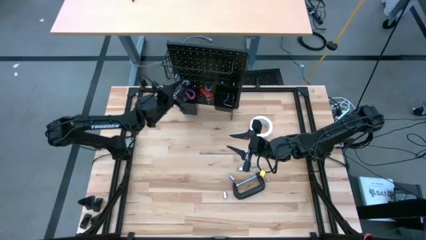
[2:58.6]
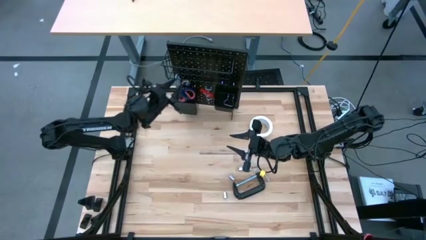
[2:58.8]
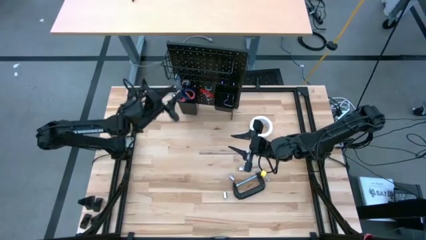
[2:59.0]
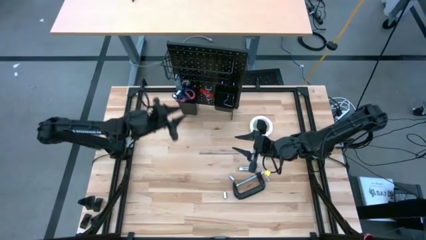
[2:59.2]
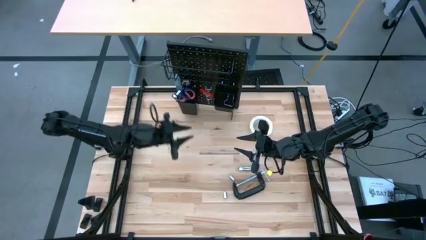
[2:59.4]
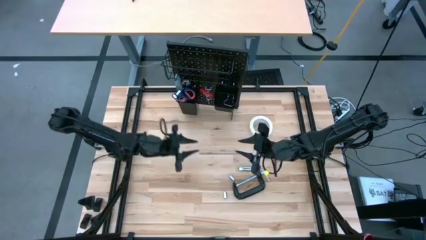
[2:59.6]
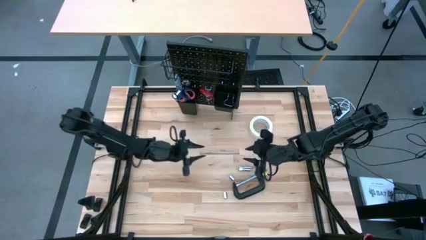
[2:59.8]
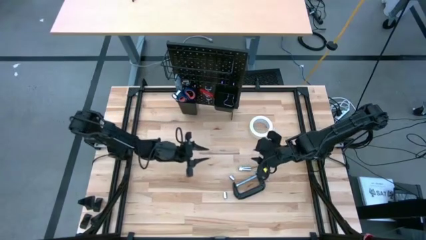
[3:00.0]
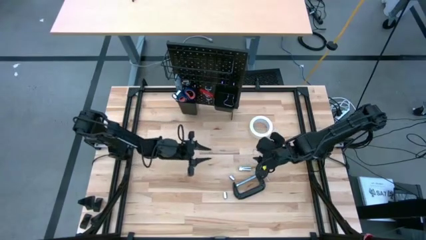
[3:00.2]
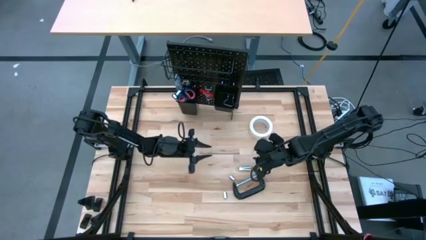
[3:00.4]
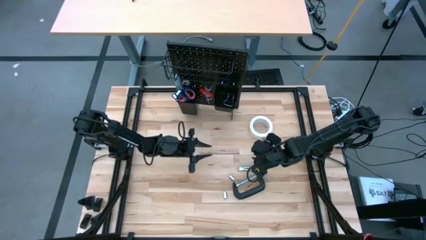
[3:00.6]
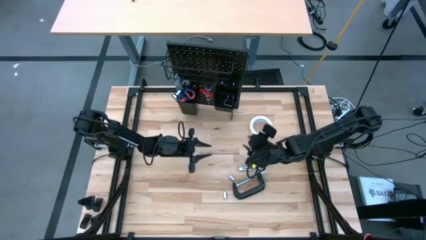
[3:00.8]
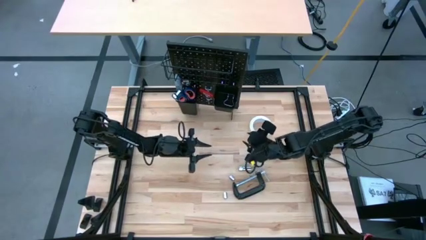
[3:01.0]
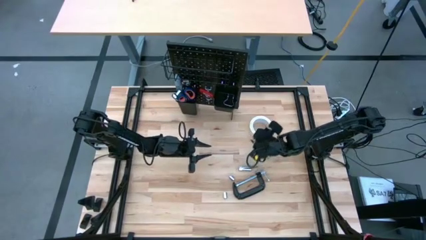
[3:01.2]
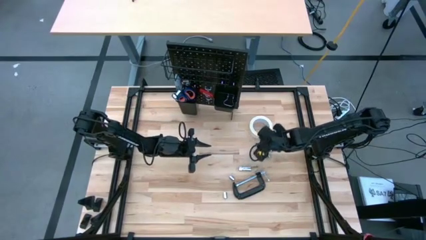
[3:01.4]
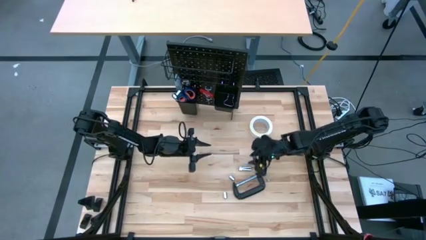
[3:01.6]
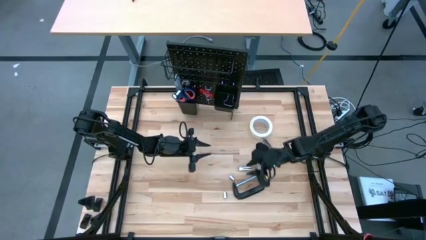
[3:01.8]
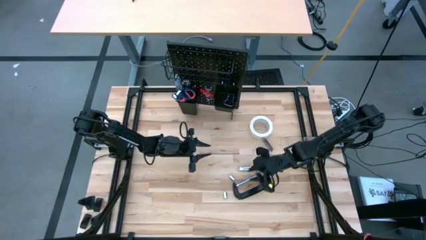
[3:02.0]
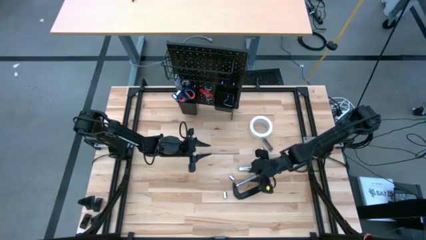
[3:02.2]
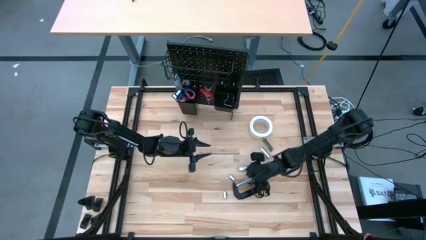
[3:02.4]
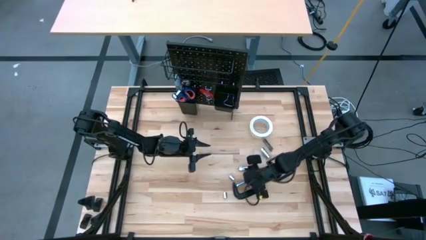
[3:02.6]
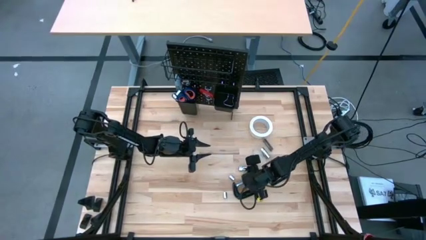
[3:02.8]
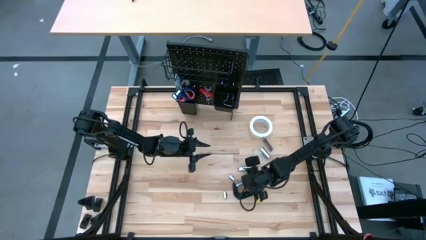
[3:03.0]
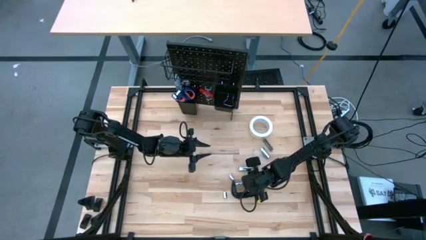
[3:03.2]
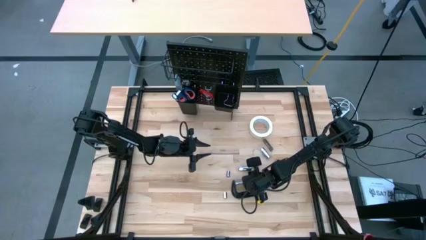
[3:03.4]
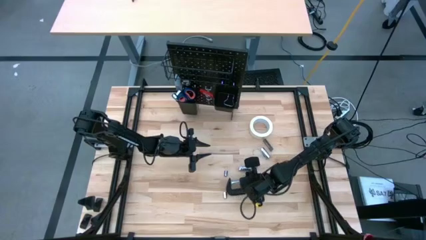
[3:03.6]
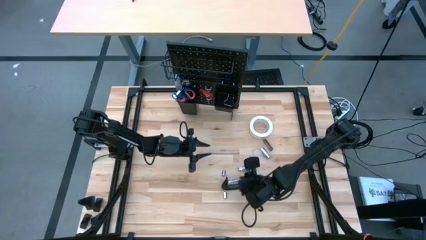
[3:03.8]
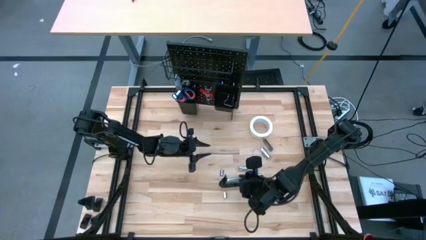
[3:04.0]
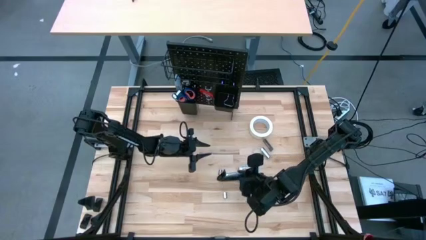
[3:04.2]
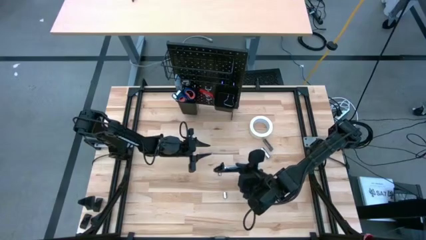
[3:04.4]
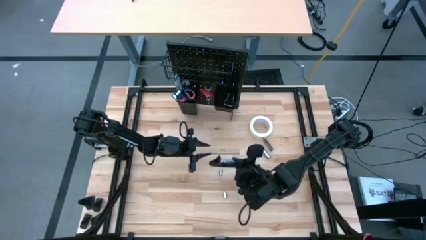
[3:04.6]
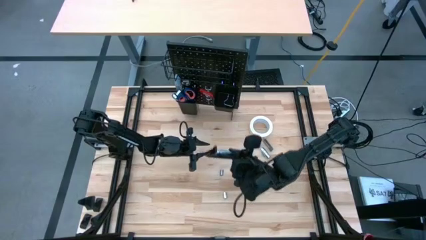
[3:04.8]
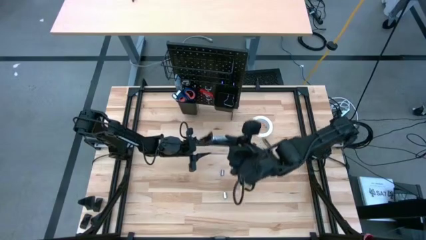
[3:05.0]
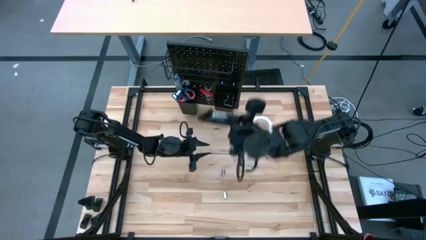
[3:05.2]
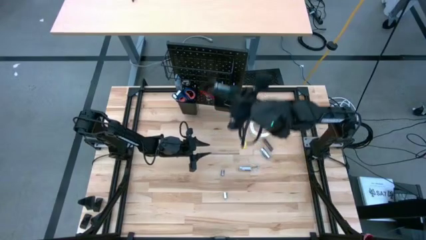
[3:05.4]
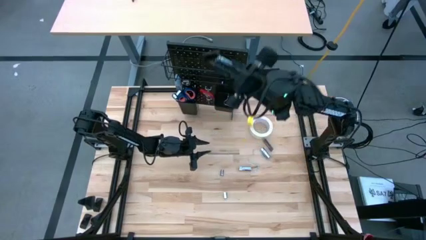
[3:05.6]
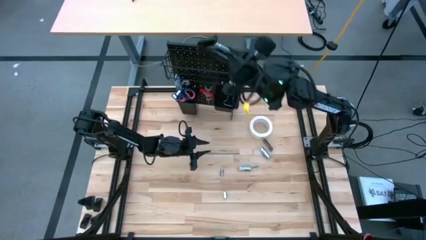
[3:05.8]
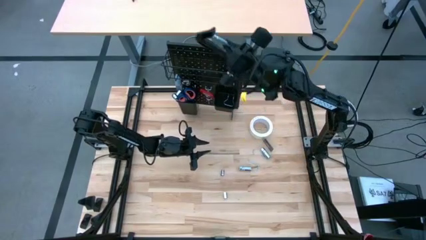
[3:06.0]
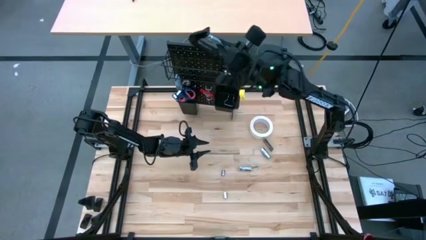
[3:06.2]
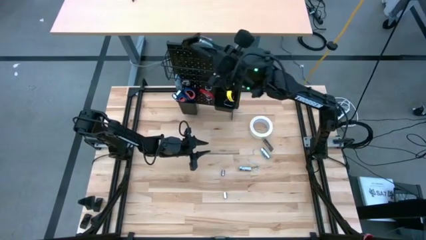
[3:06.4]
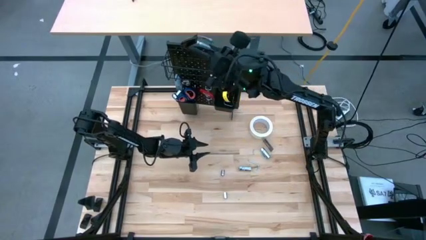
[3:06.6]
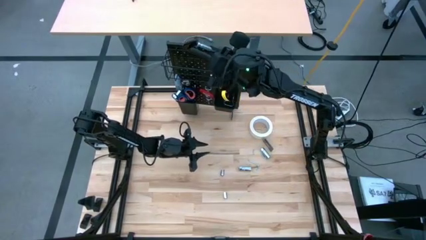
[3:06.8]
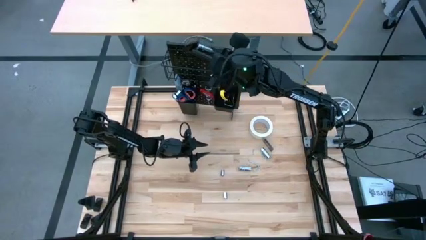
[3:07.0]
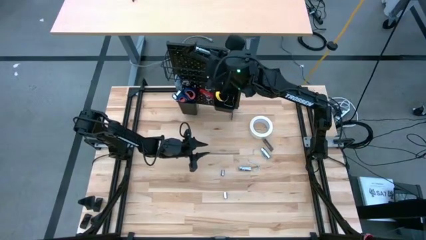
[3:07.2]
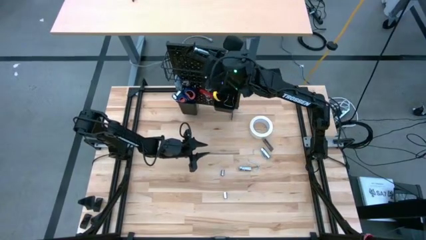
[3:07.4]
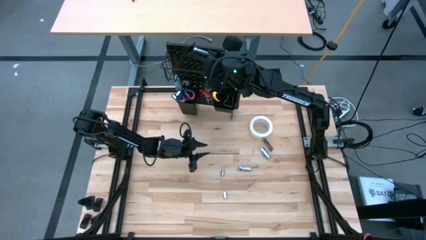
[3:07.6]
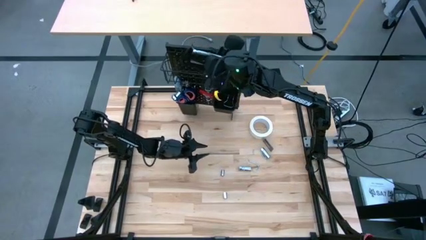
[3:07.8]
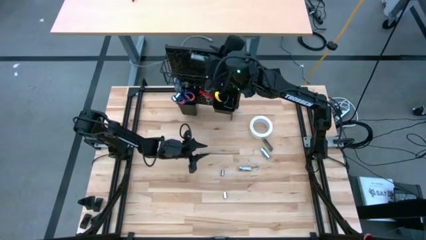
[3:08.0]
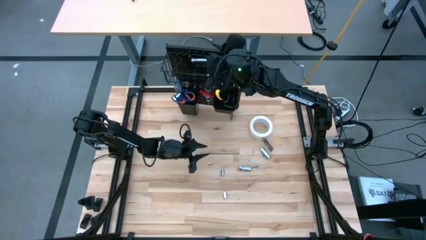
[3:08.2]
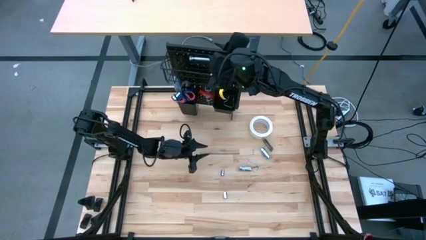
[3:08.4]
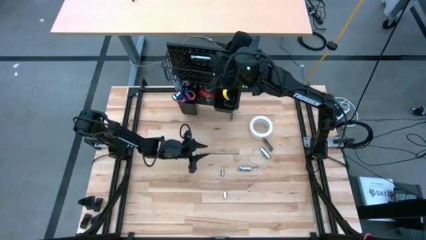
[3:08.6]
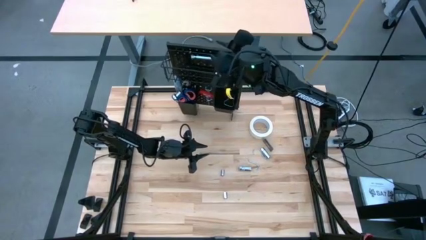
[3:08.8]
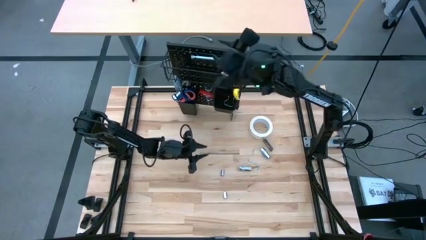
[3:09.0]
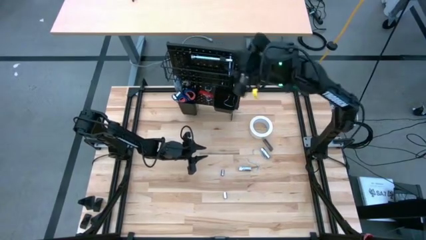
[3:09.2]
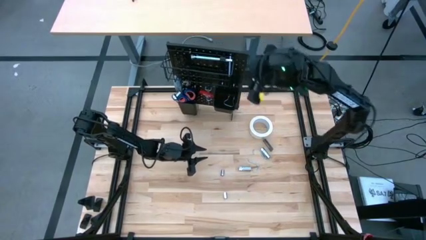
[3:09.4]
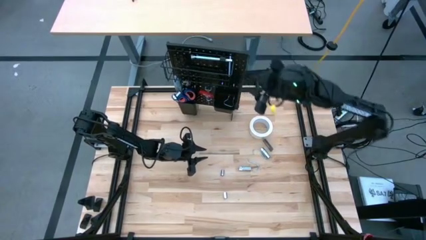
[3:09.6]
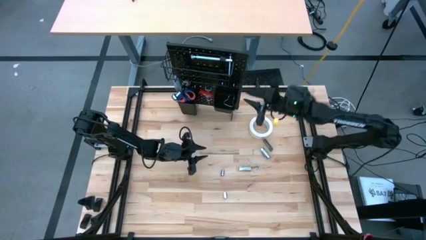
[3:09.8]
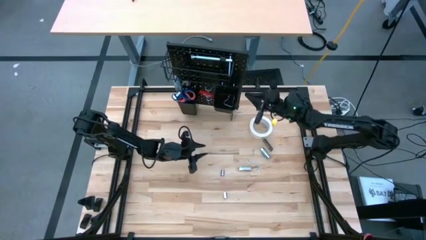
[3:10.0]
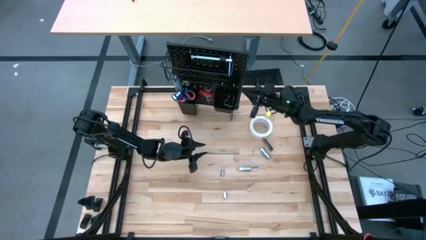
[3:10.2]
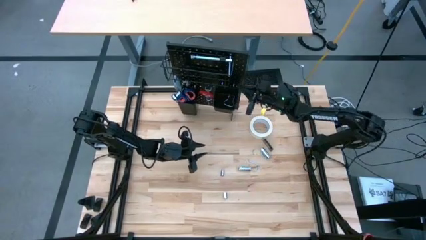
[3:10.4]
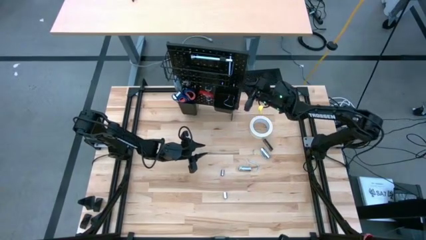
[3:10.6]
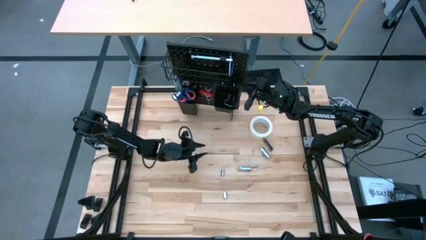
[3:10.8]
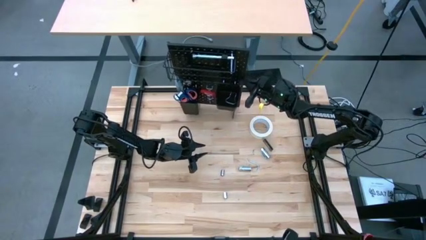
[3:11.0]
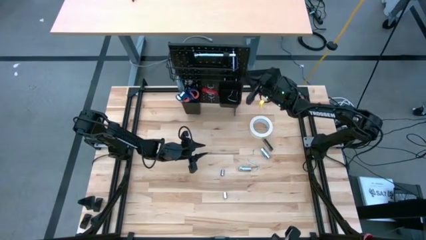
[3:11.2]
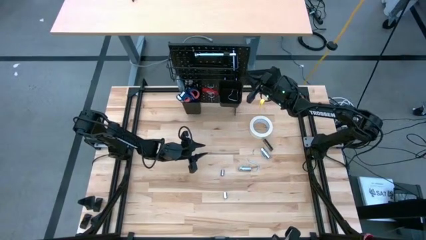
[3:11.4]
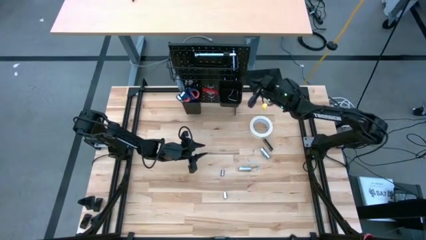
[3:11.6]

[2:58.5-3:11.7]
Task: Hang tools onto peg board
Put the black clamp into the black wire basket on the peg board
